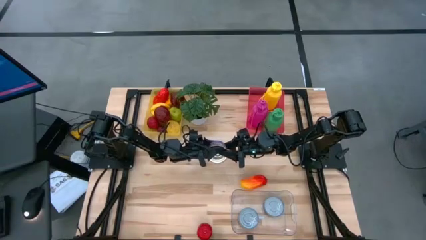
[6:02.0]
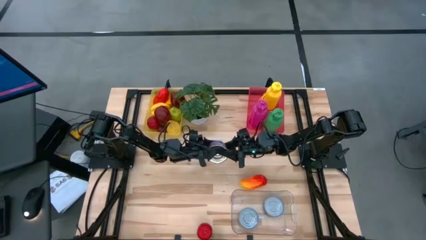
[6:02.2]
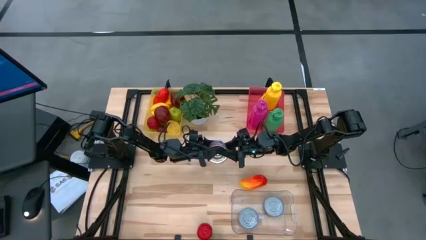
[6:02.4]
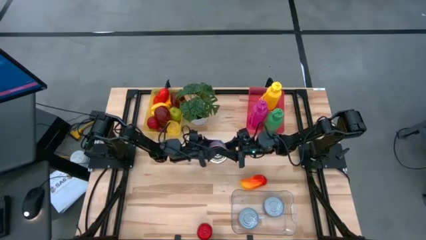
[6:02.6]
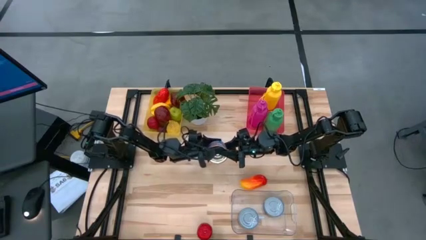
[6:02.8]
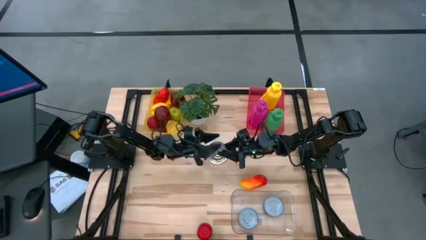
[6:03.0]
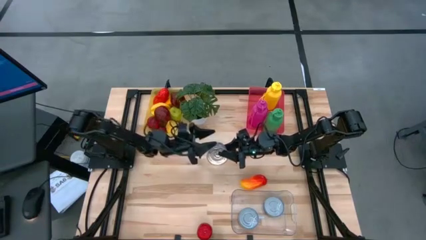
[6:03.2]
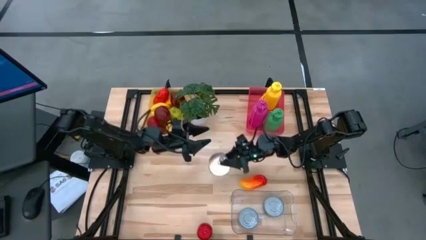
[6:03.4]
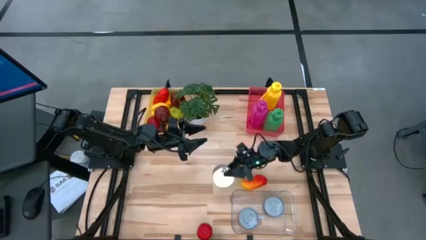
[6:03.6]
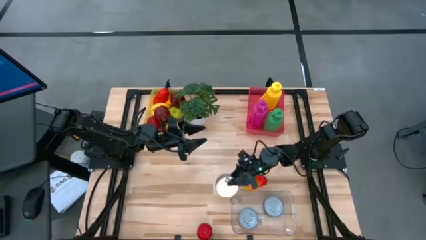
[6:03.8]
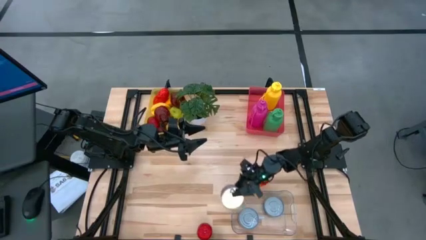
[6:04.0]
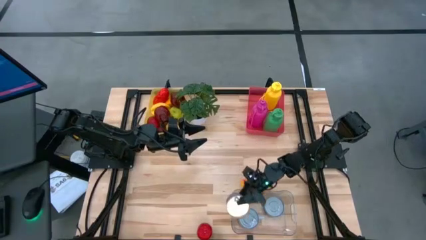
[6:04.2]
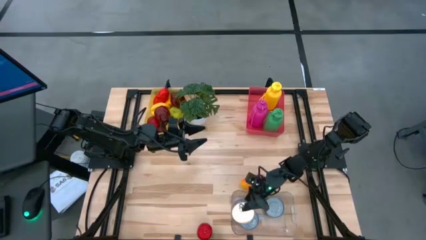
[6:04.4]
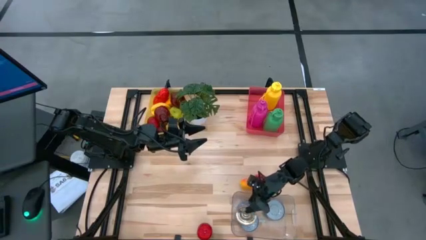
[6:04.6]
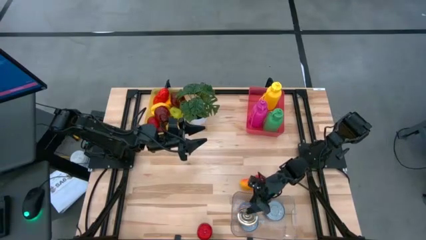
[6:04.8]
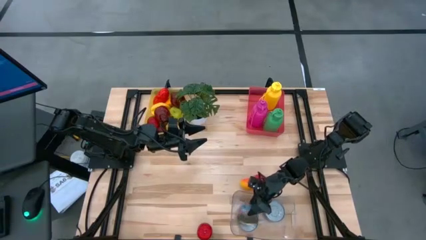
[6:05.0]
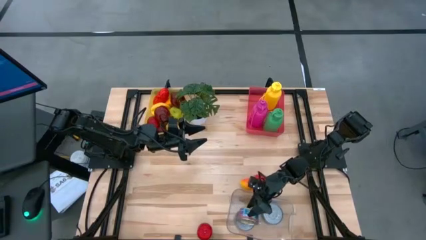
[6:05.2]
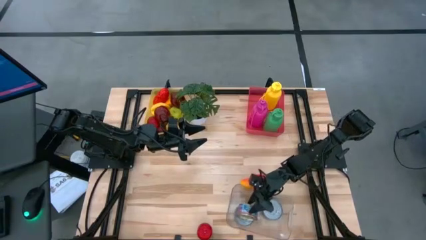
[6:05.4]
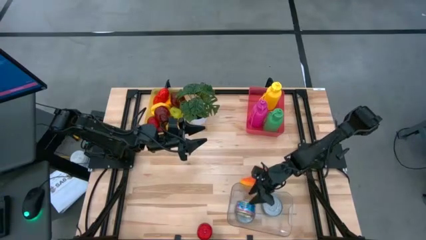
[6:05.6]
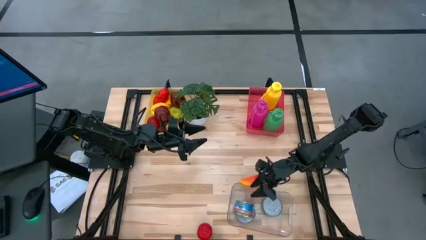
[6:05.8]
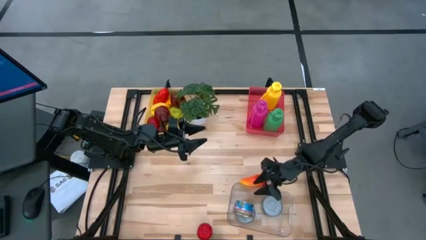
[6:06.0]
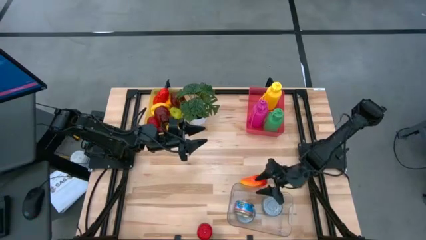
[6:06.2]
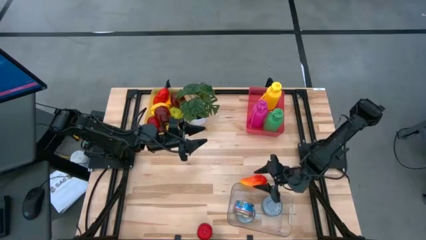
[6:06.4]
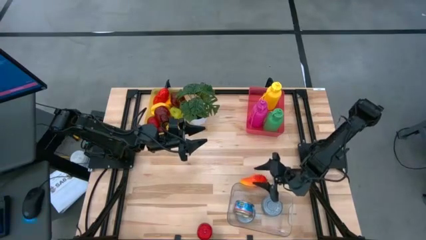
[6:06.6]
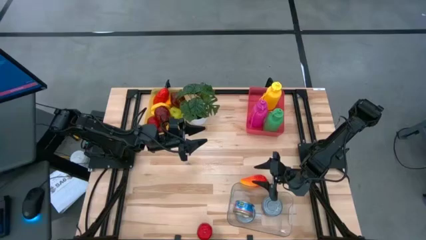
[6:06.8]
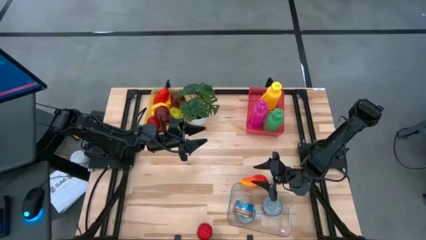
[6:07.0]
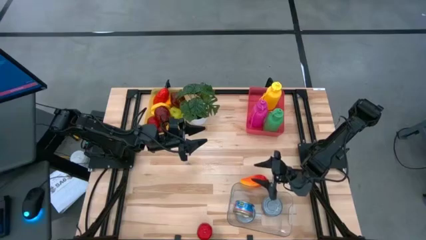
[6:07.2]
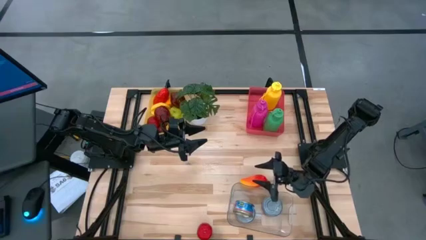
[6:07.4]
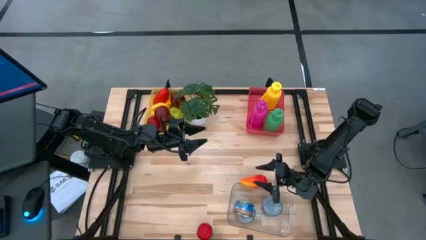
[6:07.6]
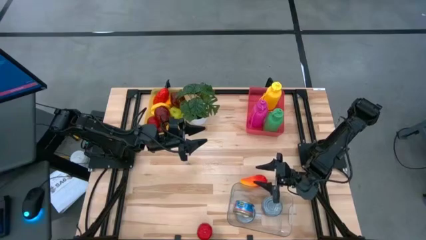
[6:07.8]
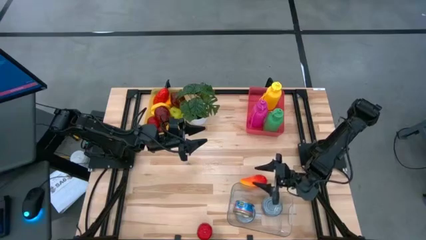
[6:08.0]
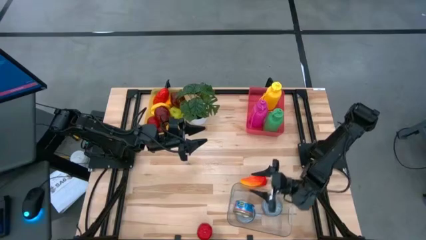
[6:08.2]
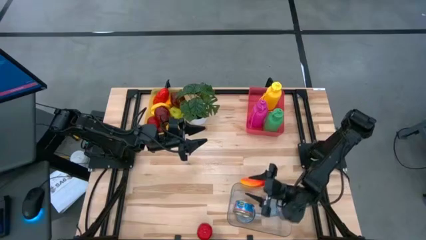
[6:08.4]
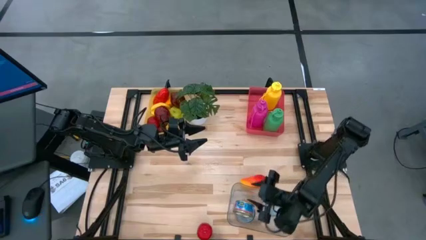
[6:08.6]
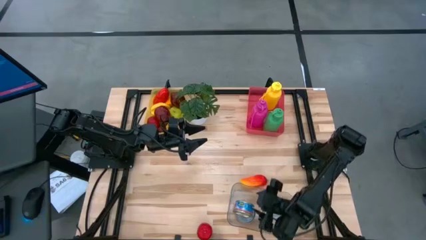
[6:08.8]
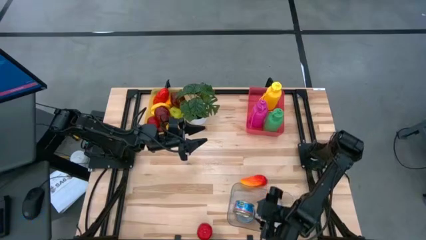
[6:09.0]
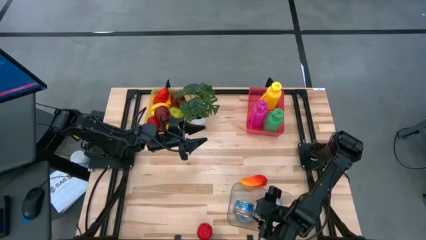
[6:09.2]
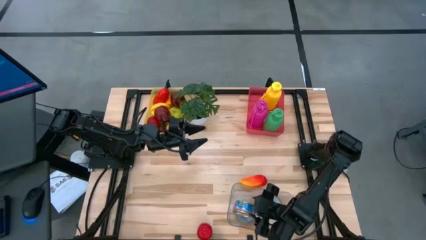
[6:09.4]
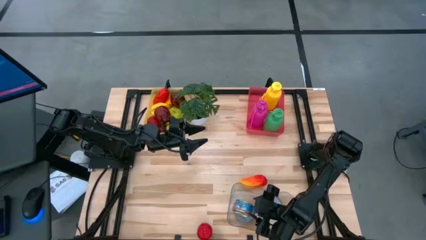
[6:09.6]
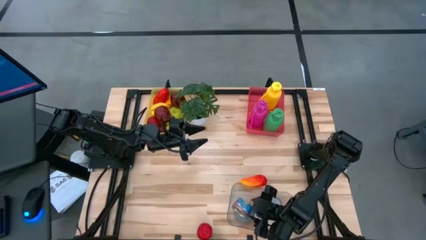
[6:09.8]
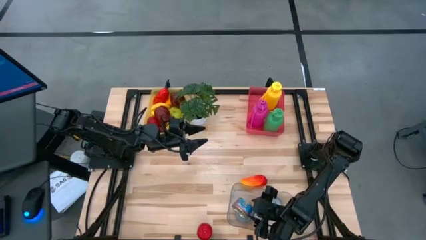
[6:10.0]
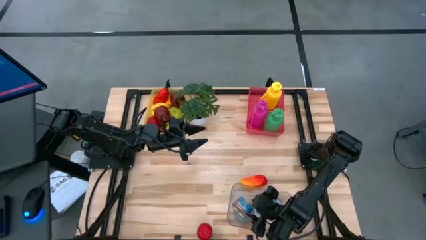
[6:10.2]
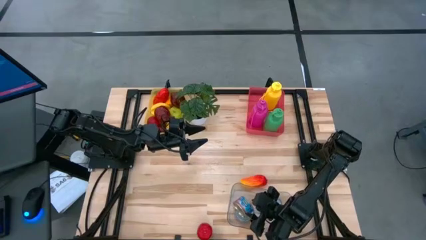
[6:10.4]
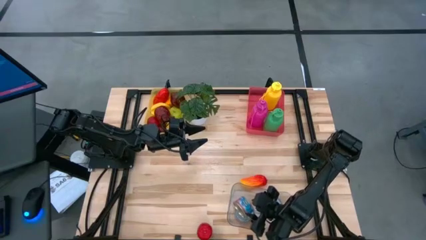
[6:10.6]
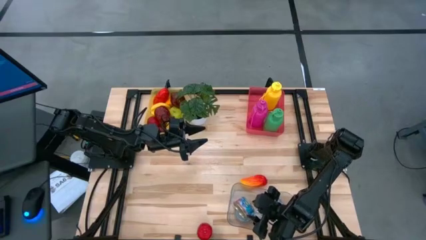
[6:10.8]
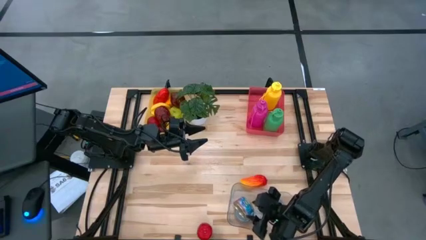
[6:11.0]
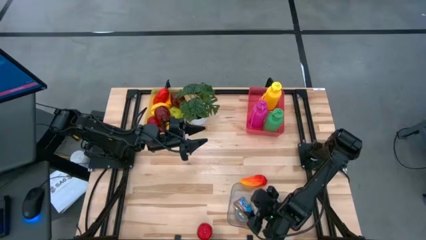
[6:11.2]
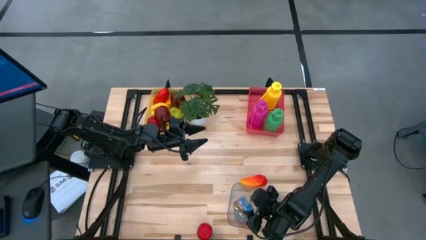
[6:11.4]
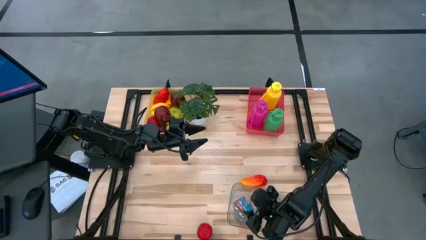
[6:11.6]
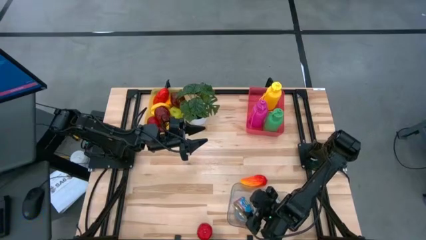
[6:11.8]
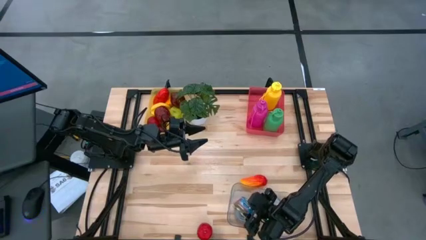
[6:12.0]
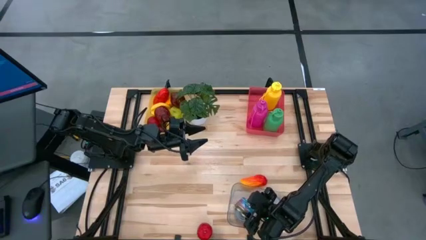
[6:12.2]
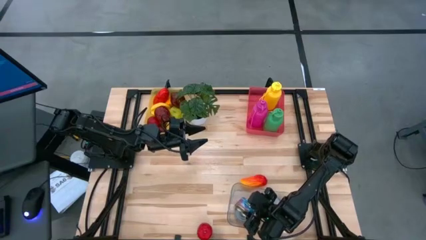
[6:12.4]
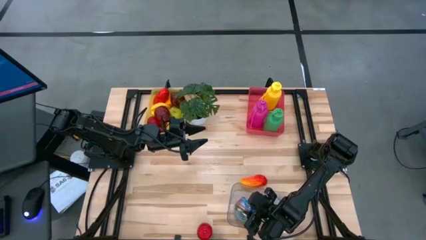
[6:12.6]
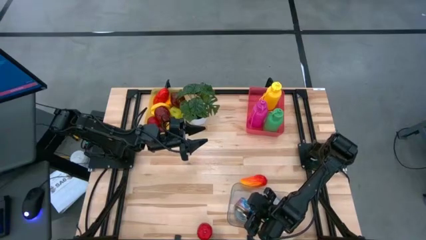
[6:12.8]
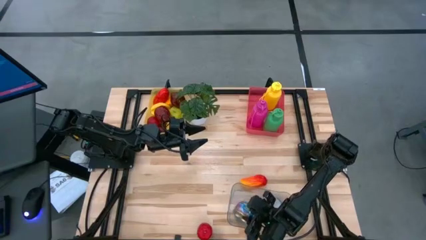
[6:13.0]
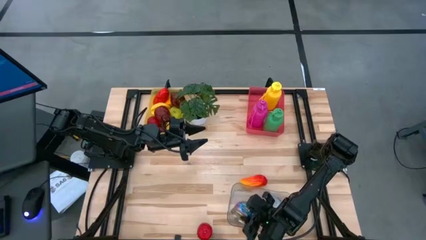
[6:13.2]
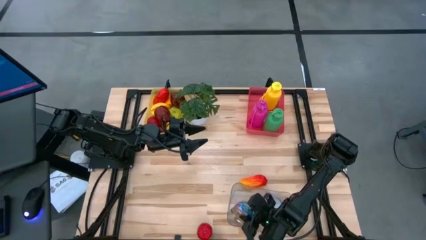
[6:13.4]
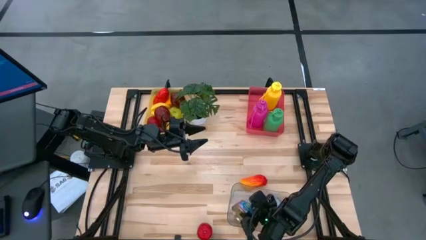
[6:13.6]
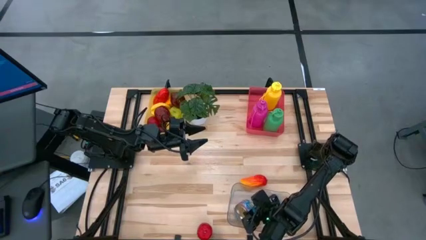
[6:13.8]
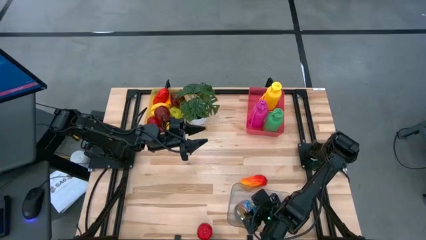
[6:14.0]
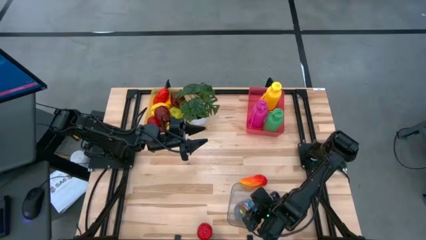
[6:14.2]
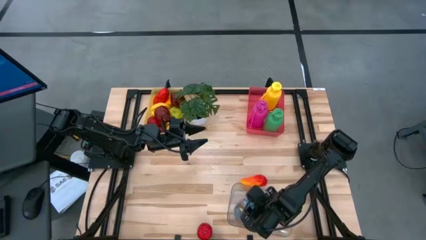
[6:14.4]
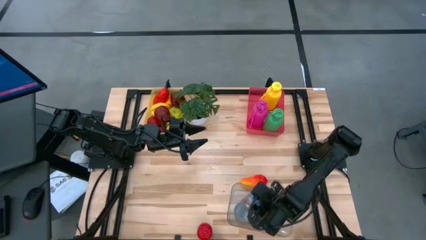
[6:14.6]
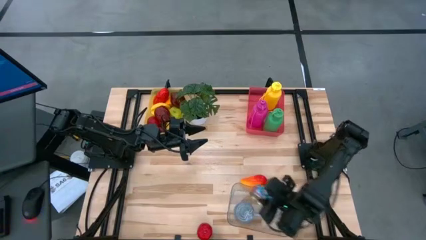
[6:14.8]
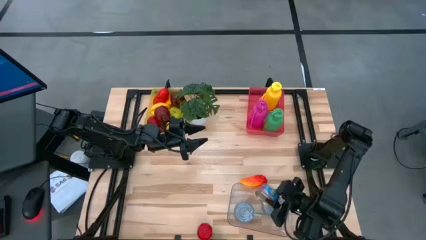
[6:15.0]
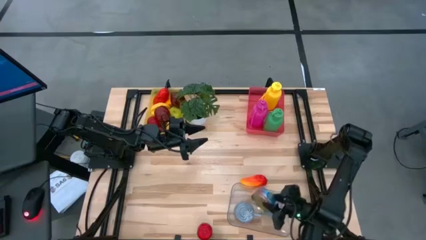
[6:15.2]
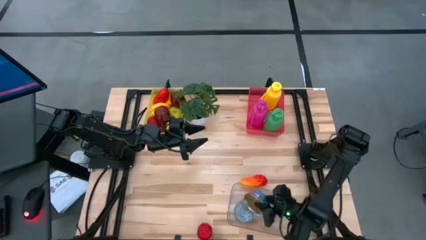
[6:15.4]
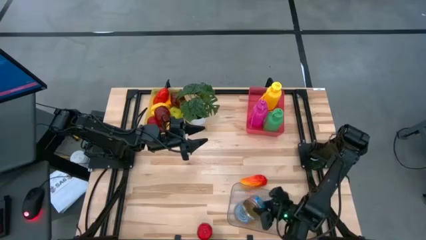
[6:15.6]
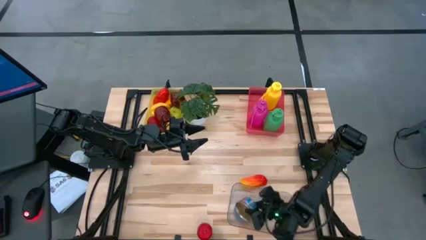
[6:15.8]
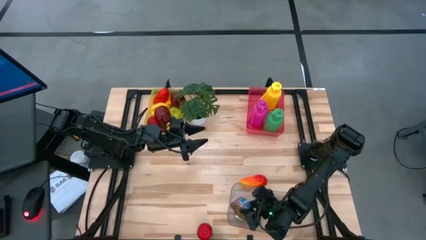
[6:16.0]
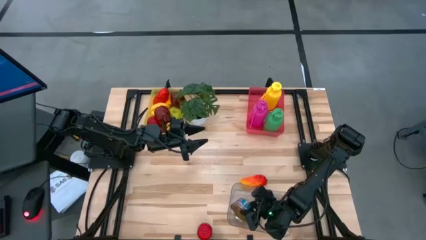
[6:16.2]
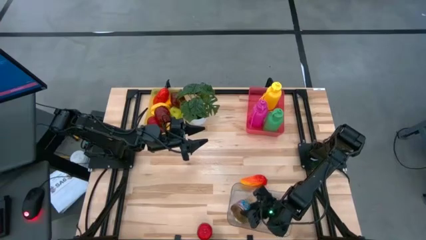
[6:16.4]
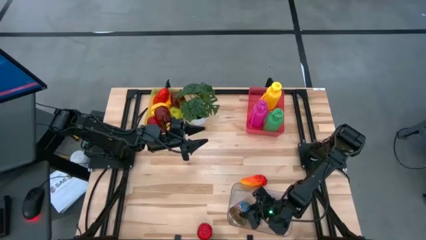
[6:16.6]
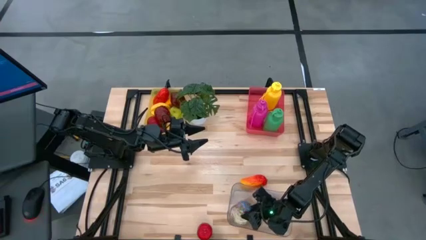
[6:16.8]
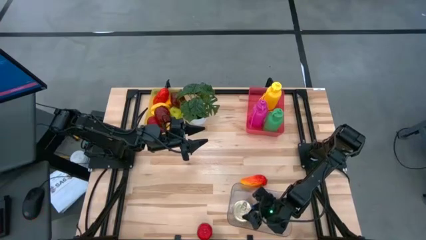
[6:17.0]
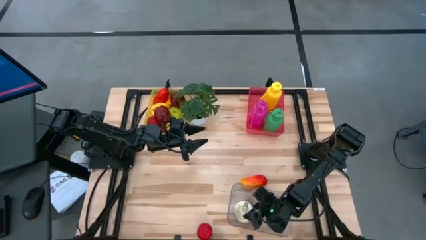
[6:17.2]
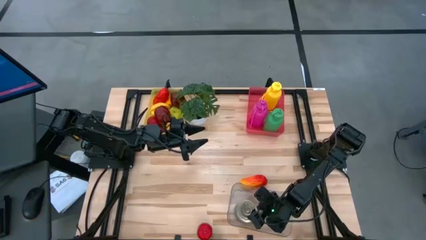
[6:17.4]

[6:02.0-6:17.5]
Task: Pick & Place Food Item
Put the blue pink tuna can into the transparent bin
